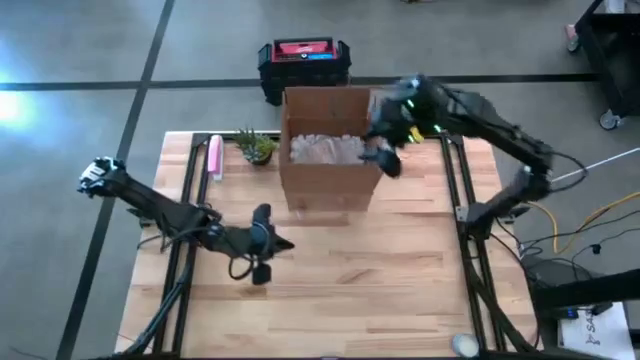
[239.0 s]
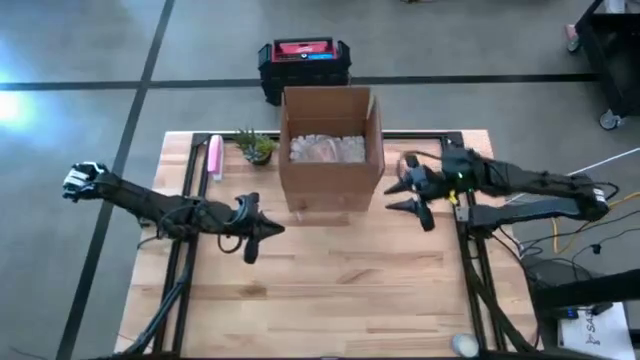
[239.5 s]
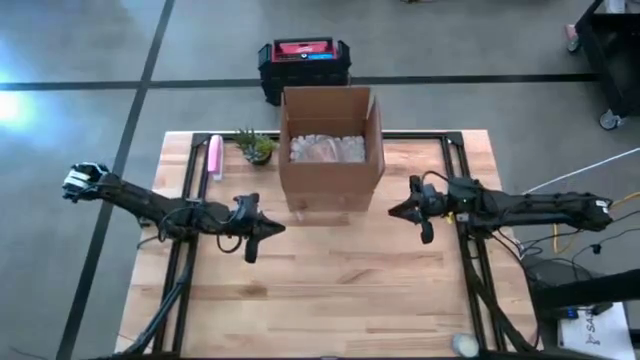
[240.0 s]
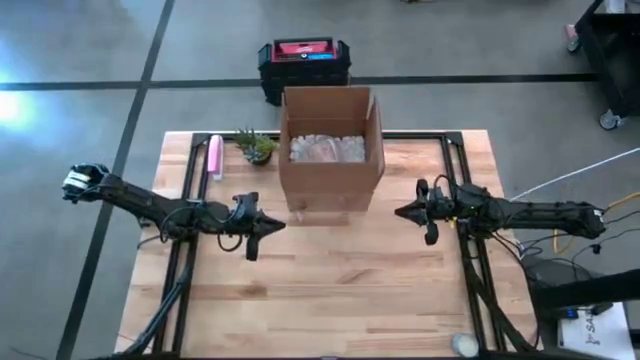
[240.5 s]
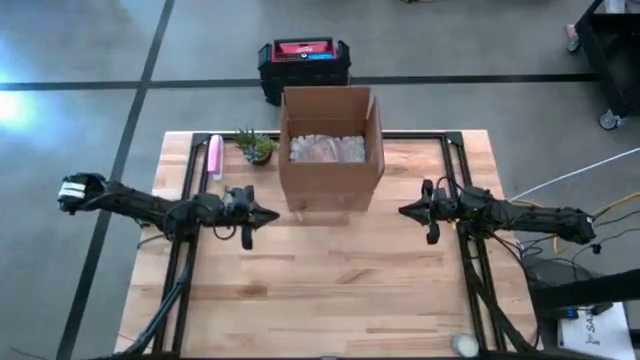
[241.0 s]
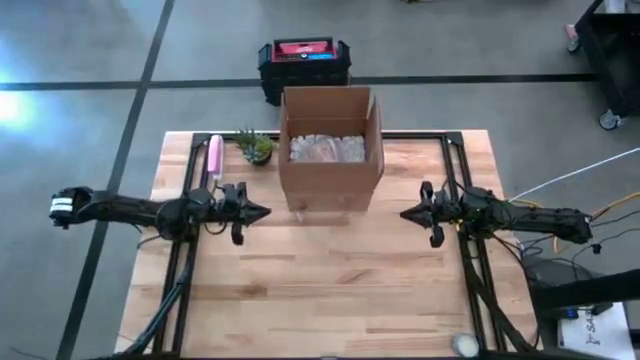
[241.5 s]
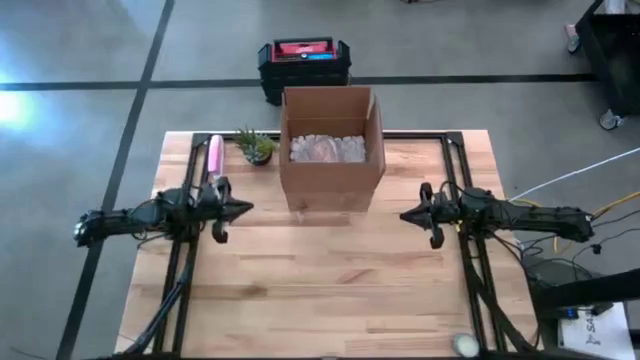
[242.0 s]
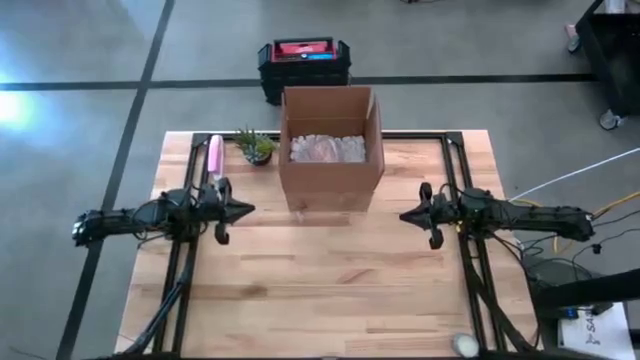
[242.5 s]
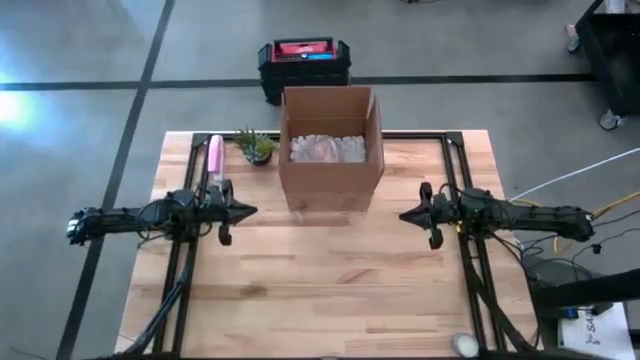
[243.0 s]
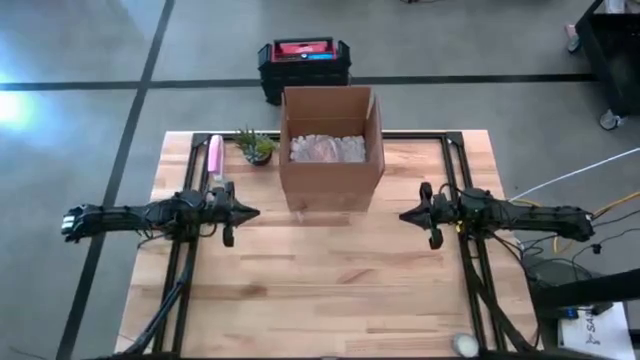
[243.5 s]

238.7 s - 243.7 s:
Task: wrap mug
Return to Home Position

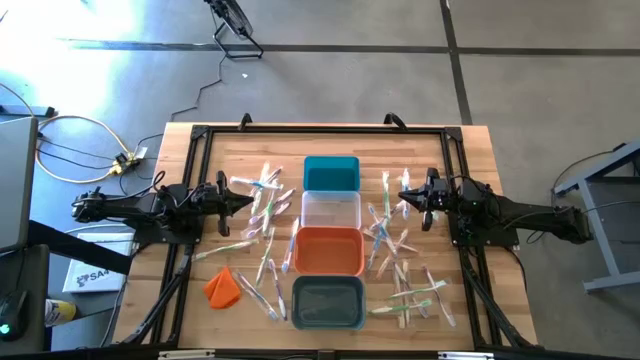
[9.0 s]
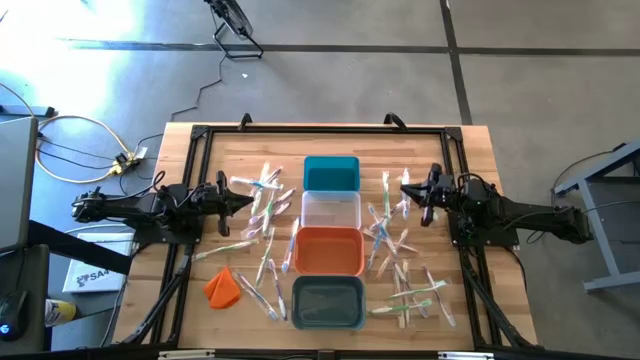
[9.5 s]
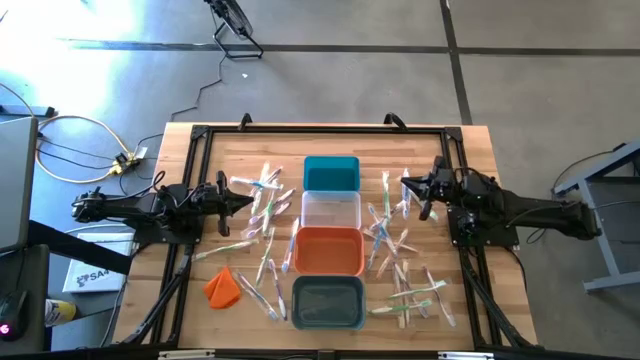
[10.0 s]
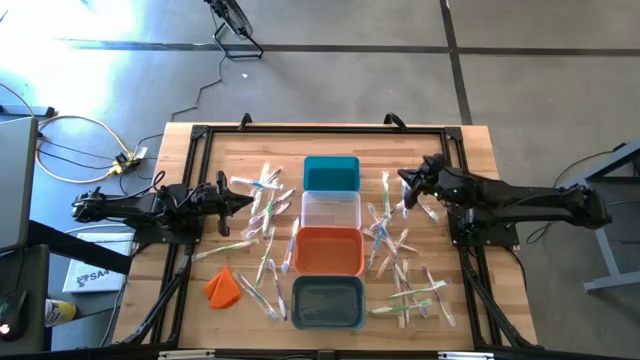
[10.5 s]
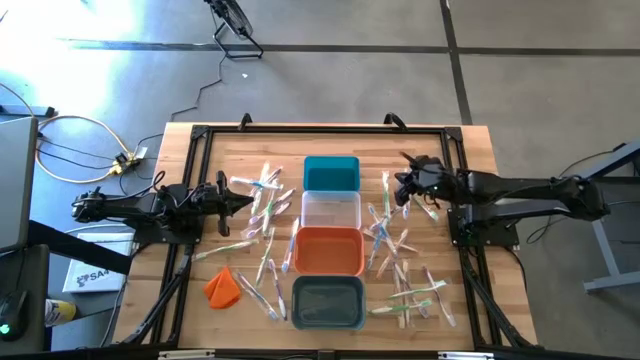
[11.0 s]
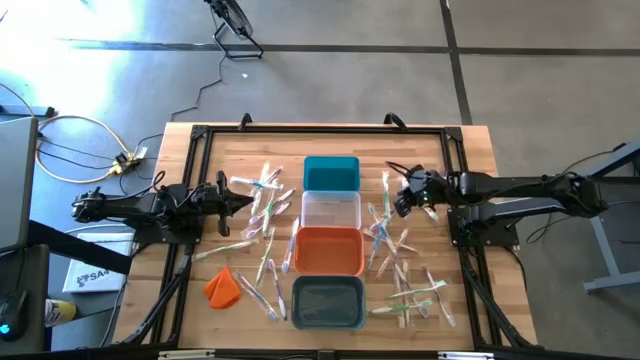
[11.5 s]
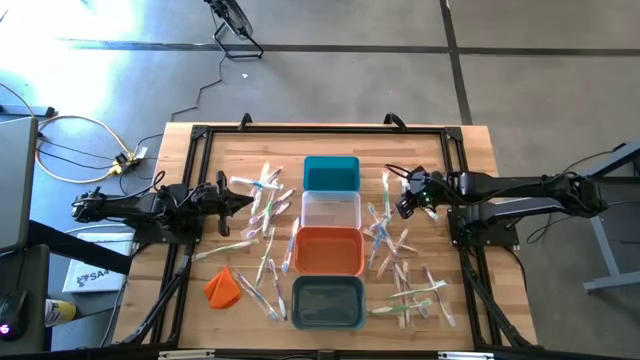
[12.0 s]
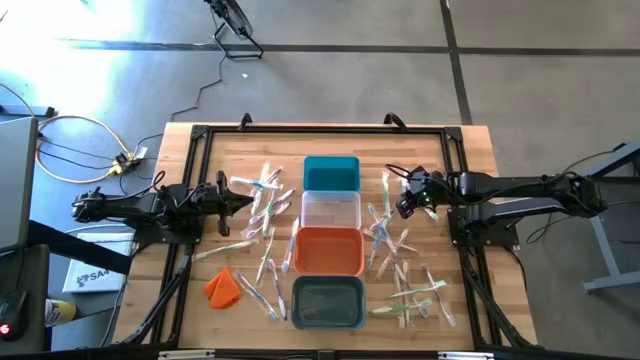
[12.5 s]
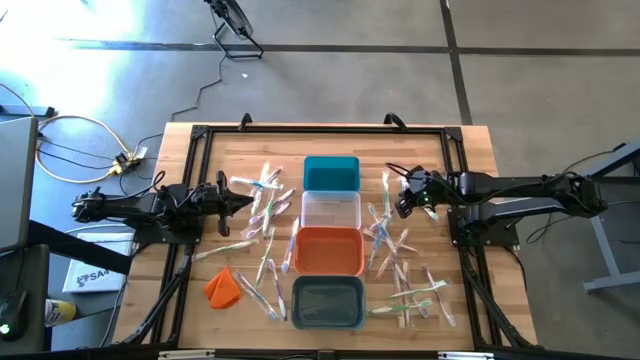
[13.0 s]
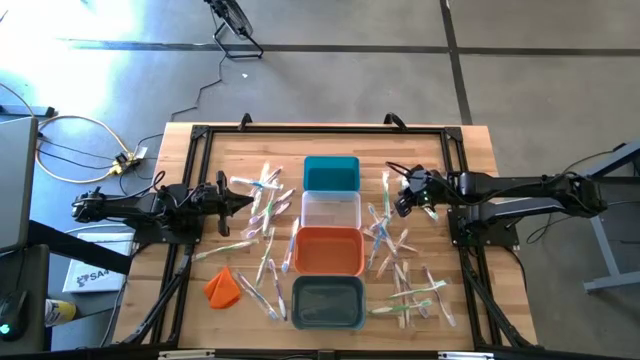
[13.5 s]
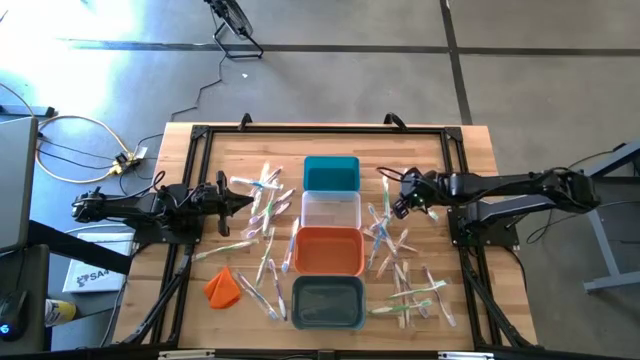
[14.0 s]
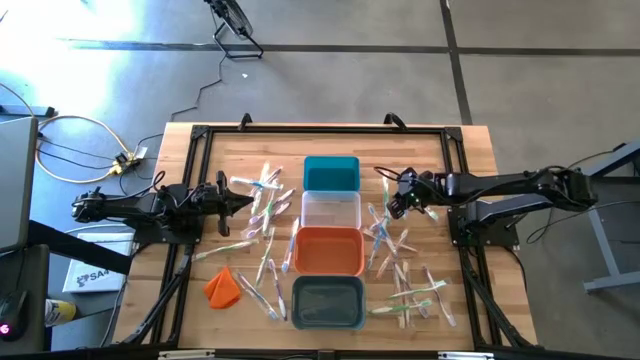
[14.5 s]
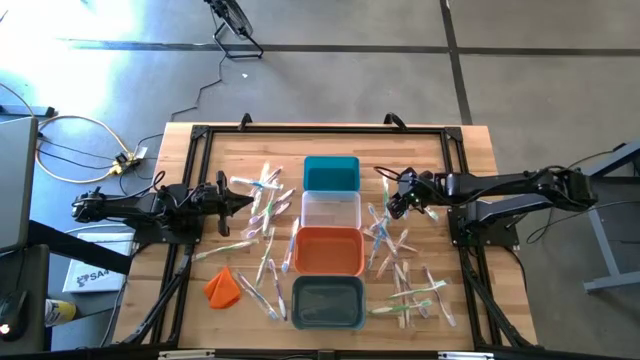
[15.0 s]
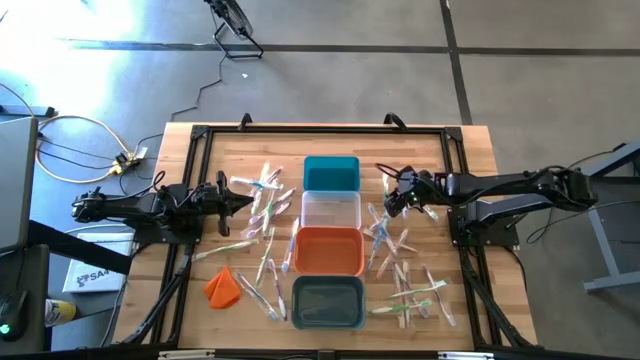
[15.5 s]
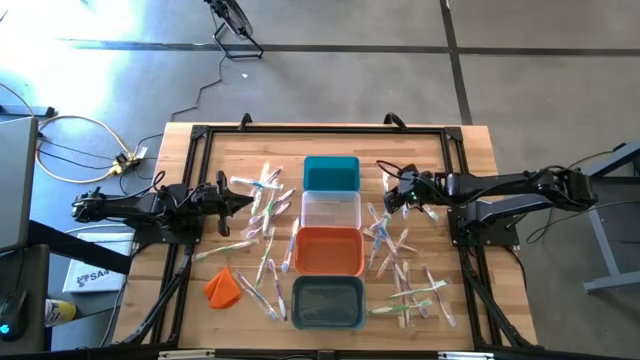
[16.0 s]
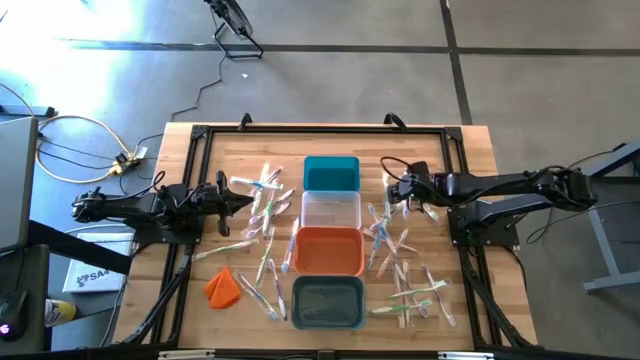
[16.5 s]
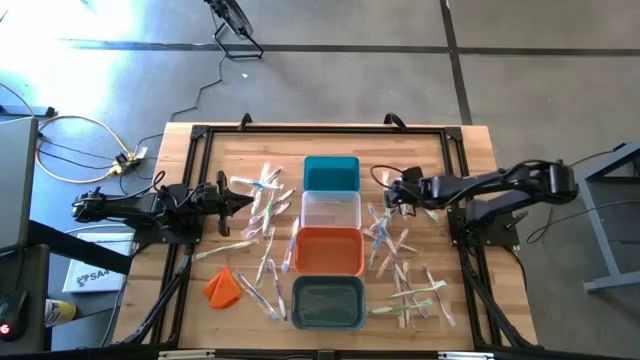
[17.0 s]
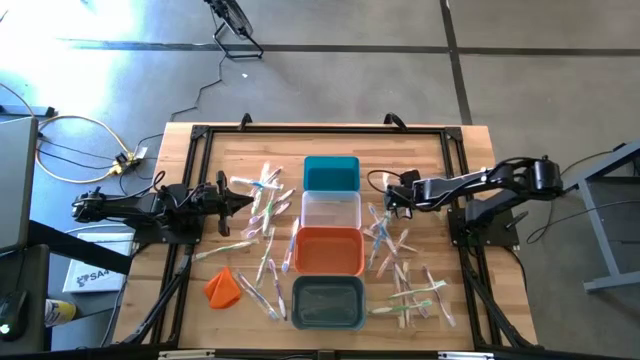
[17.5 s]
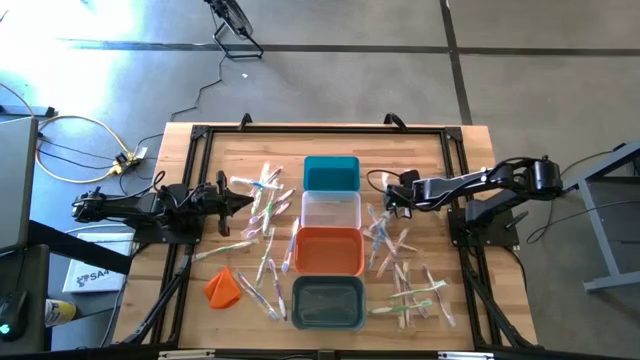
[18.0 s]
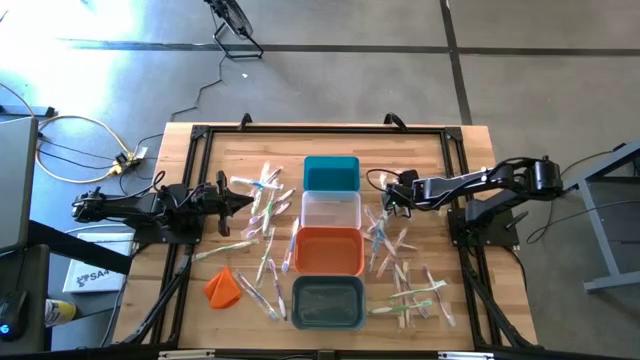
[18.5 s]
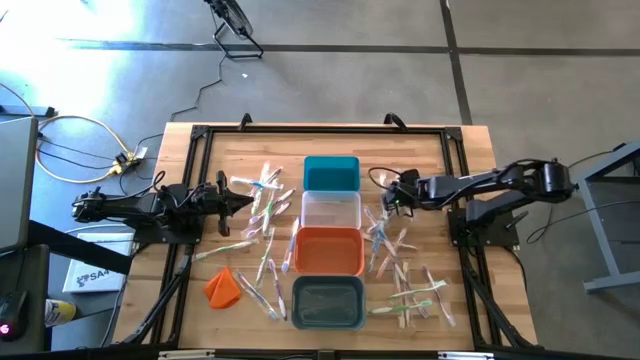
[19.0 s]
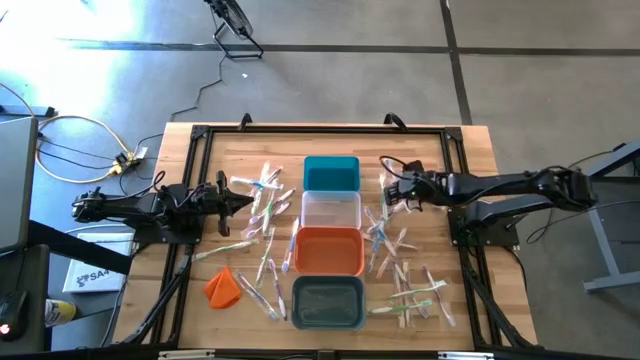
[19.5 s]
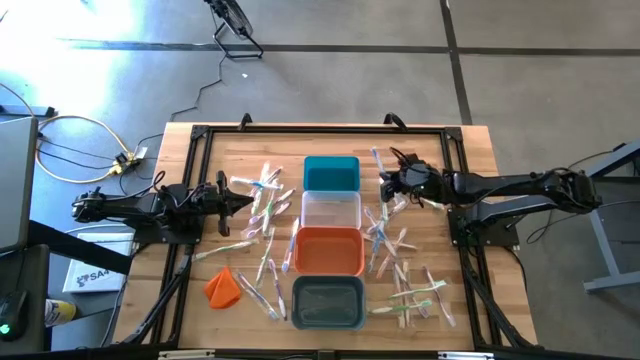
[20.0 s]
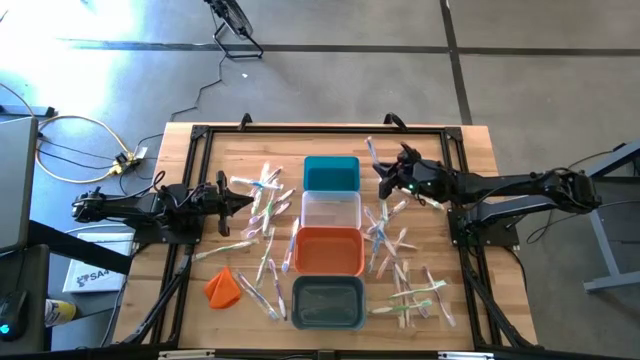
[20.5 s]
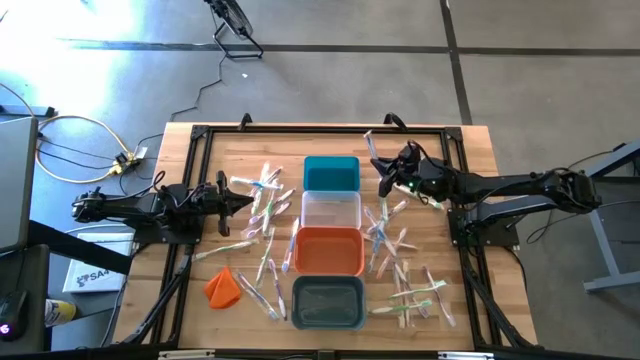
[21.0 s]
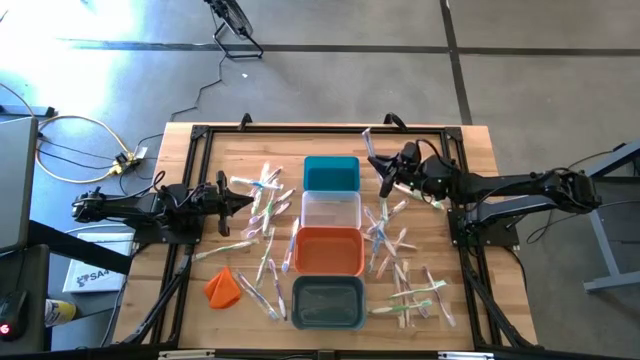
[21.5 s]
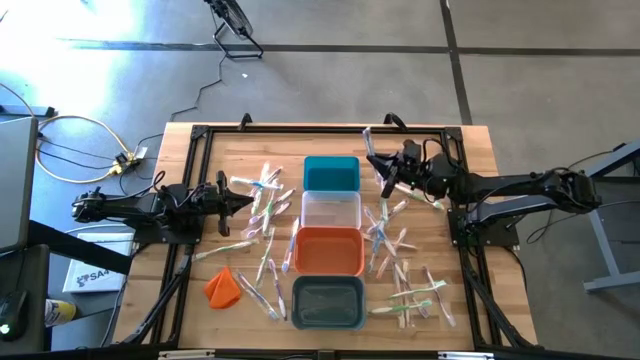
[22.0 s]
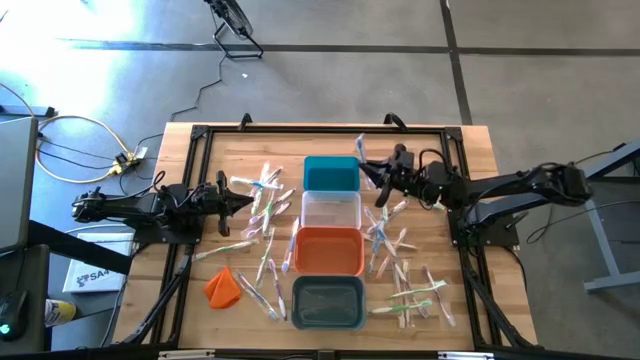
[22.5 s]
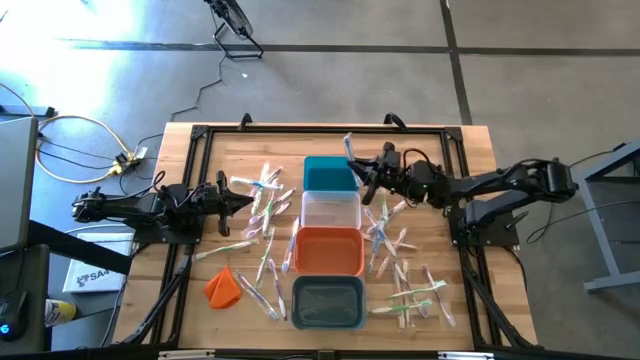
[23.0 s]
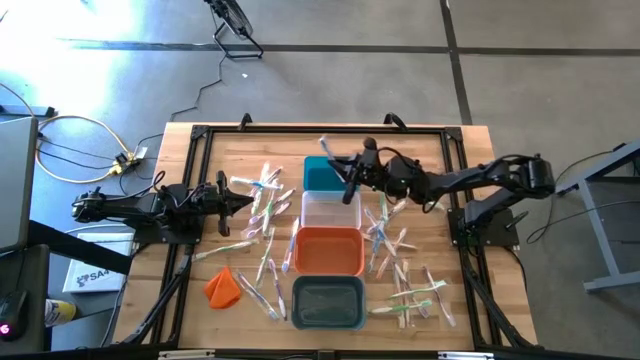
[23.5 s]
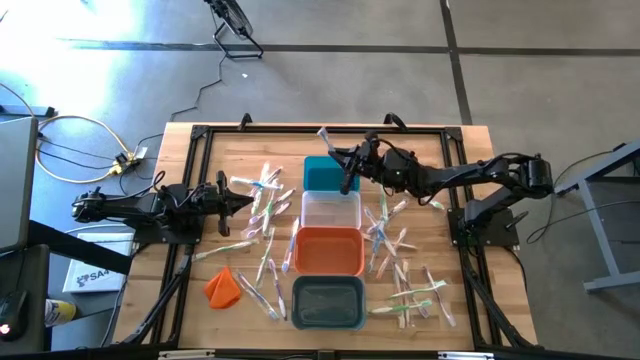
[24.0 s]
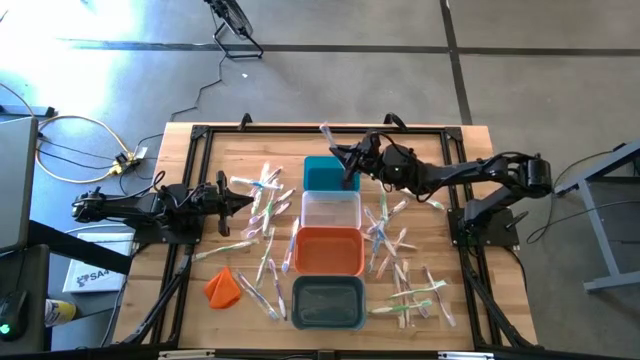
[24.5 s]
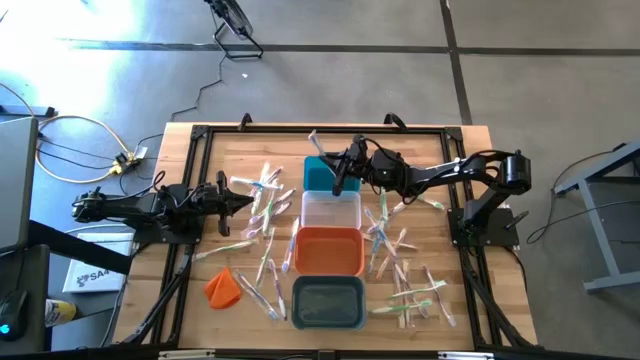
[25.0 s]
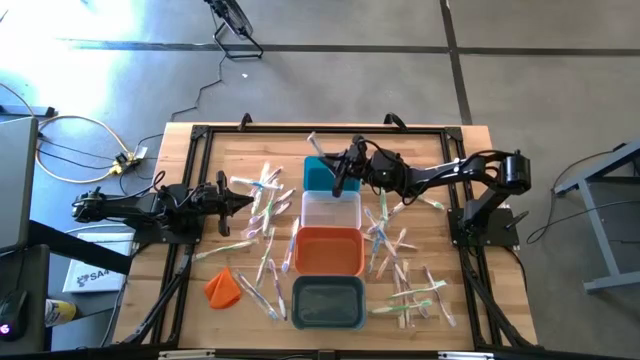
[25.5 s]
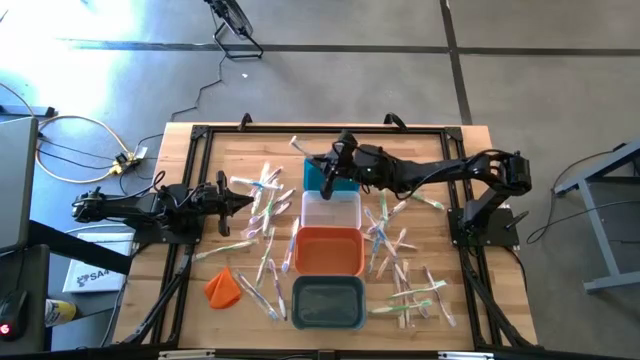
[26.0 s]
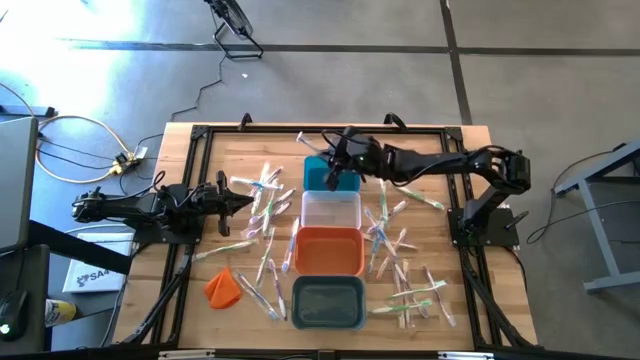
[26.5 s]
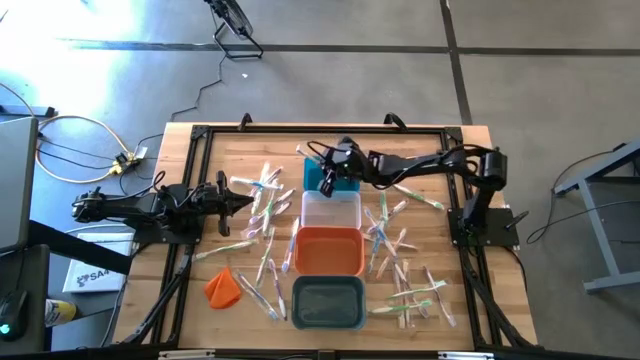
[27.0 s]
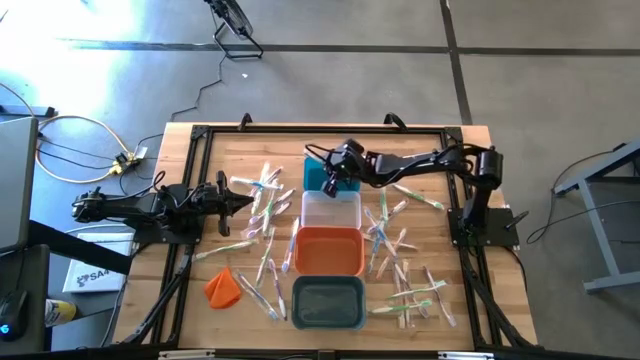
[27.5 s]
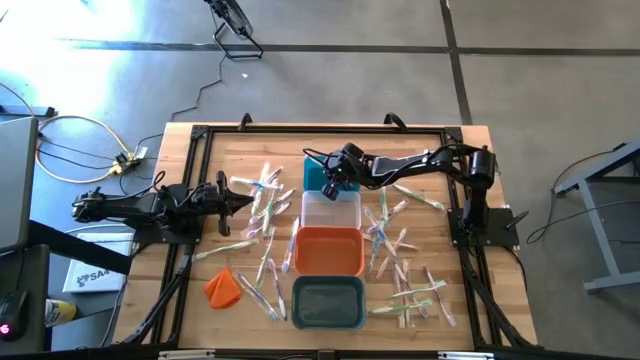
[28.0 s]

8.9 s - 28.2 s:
Task: Pick & Place Toothbrushes
Put the blue toothbrush into the blue bin
